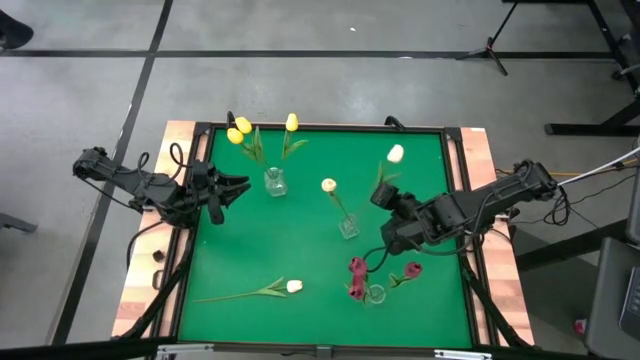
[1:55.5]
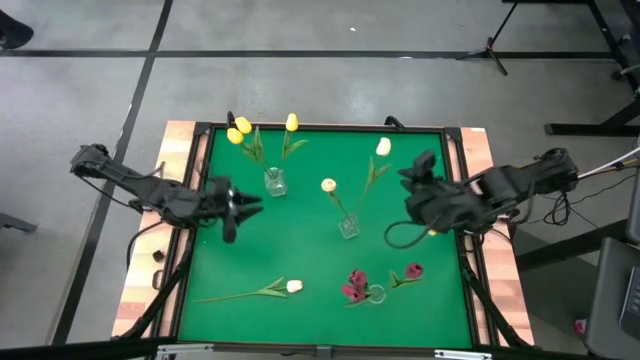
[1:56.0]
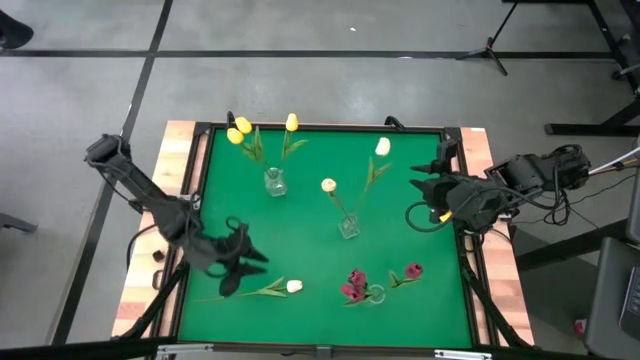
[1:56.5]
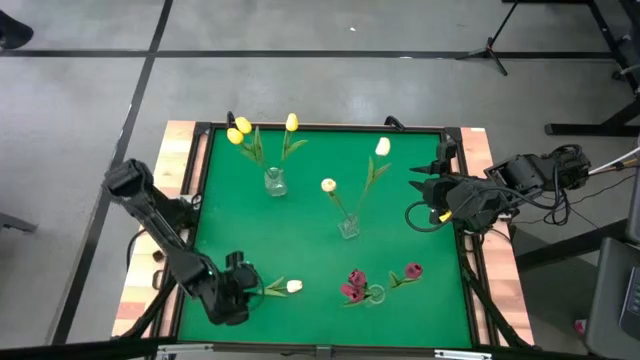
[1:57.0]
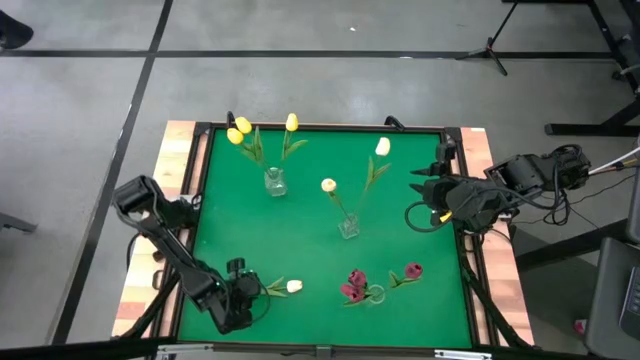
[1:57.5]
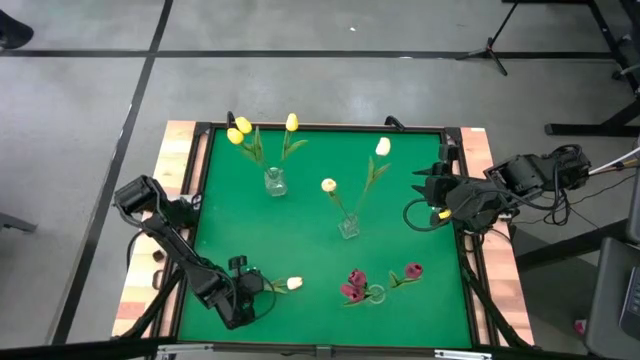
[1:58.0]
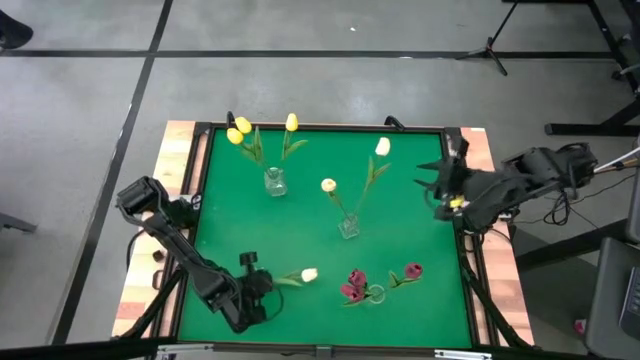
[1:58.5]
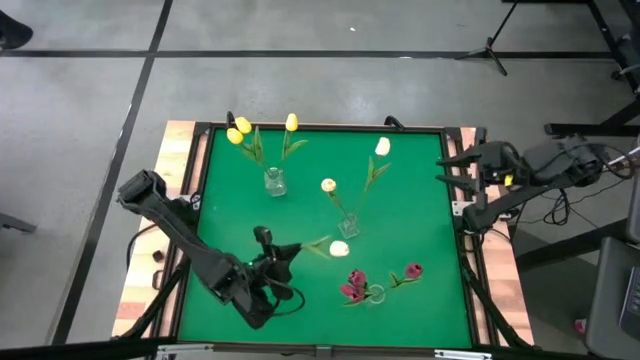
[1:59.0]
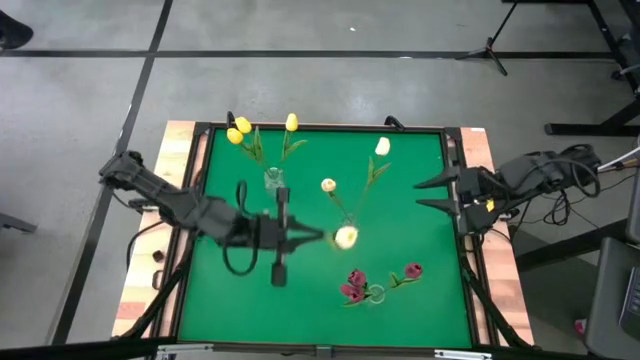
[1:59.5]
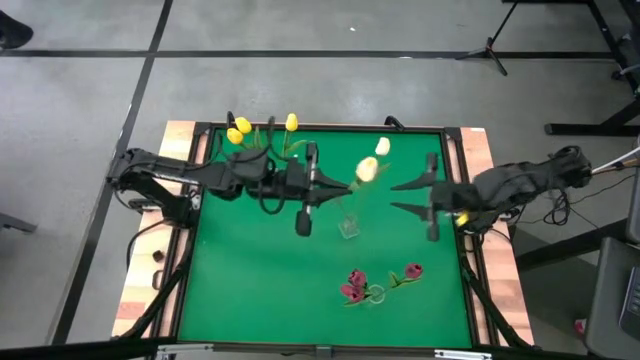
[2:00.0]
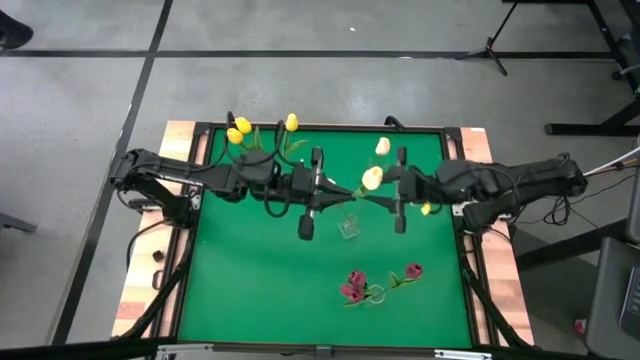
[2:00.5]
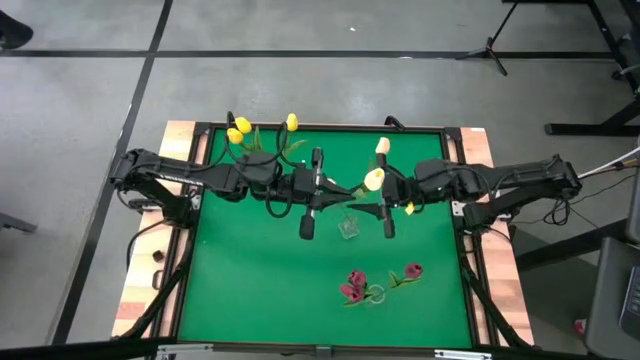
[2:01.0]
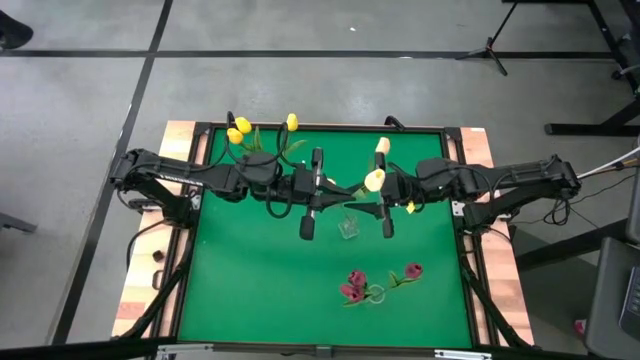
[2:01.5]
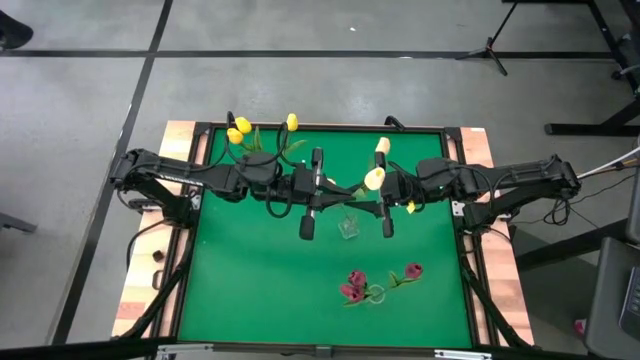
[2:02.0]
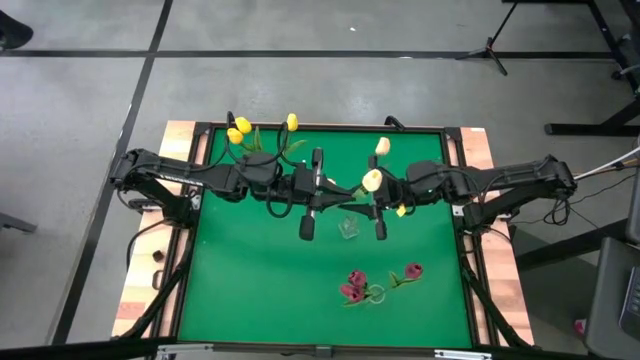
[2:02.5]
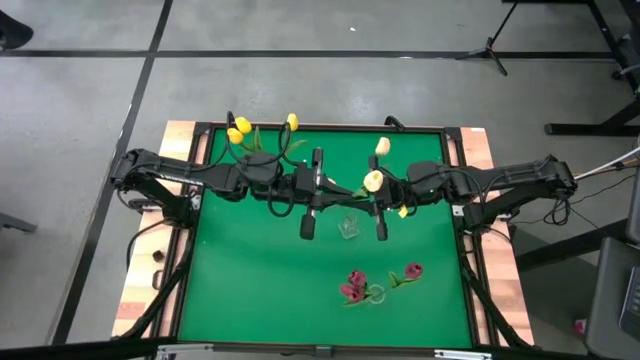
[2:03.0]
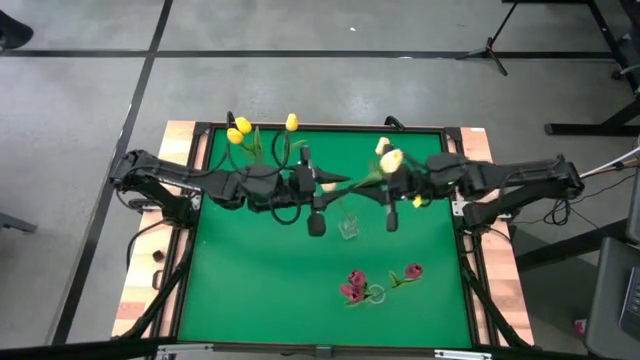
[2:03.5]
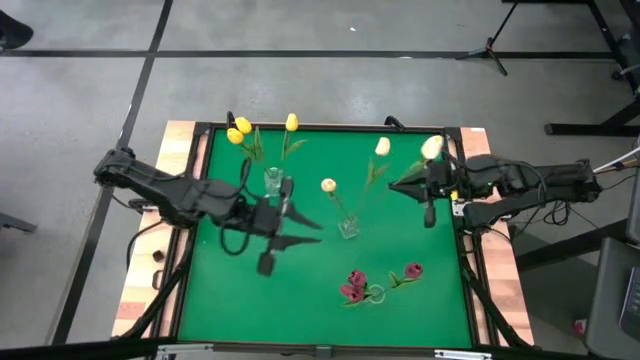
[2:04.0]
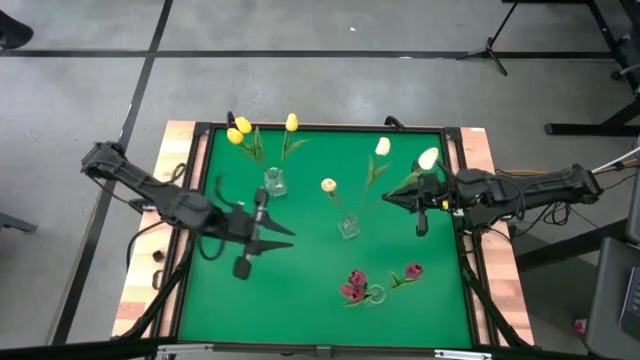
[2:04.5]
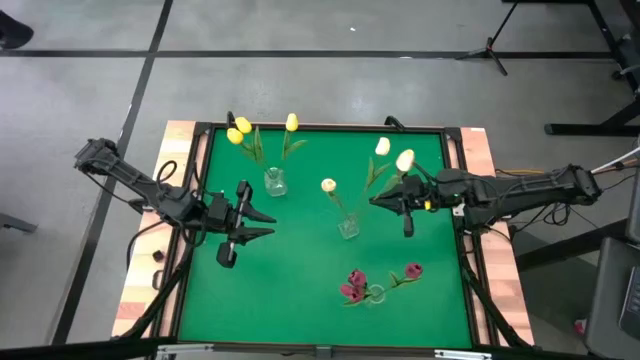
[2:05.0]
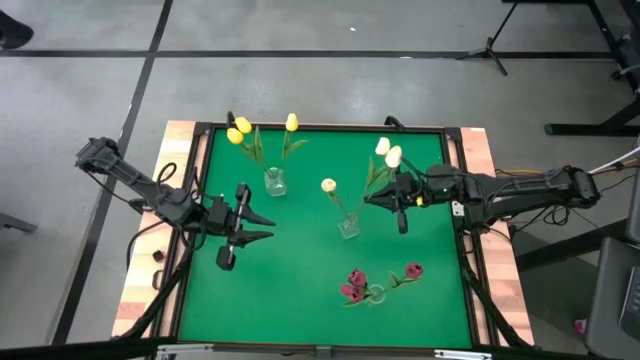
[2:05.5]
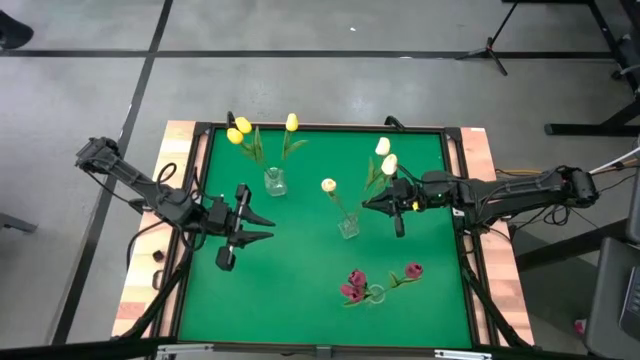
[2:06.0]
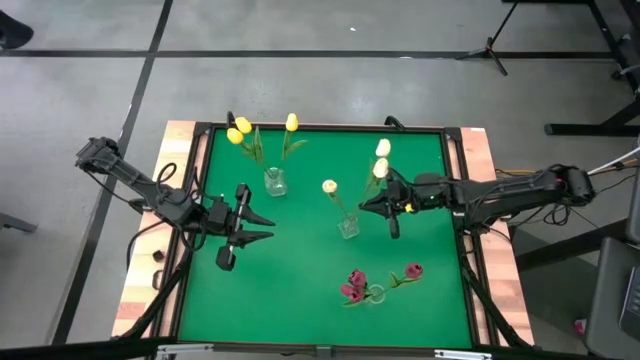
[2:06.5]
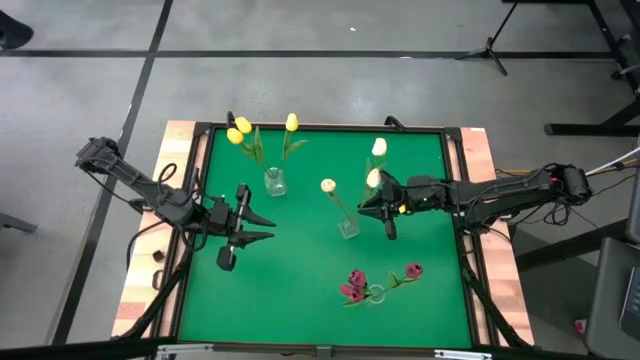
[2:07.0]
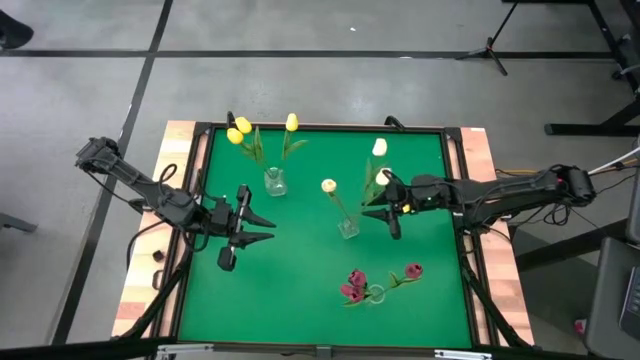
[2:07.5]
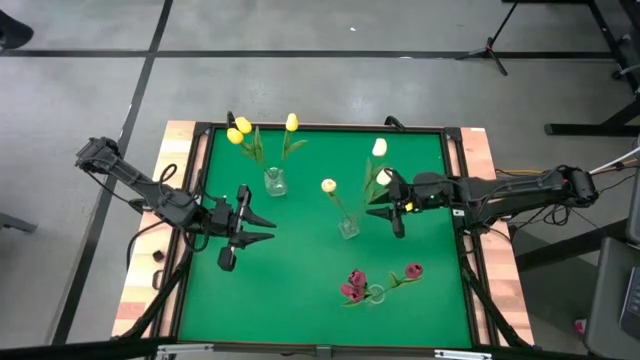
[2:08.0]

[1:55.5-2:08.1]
Task: Sort flowers into vase by color
Put the white tulip into the center transparent vase

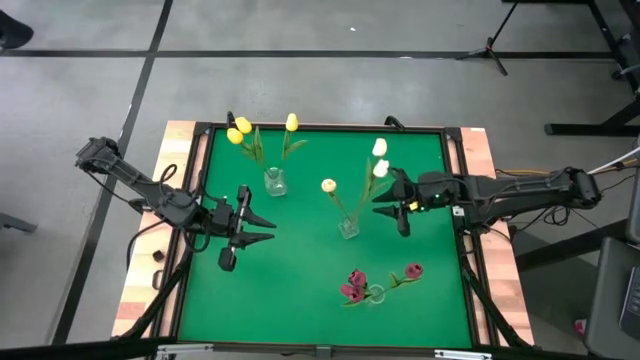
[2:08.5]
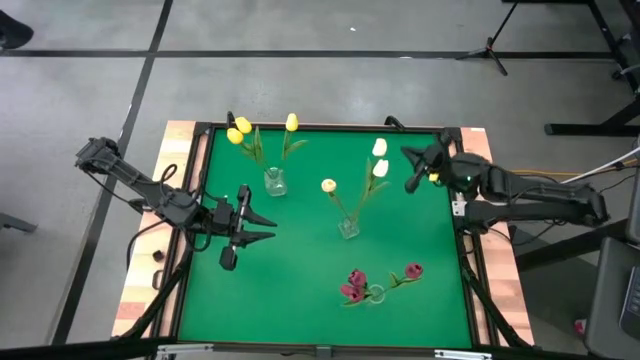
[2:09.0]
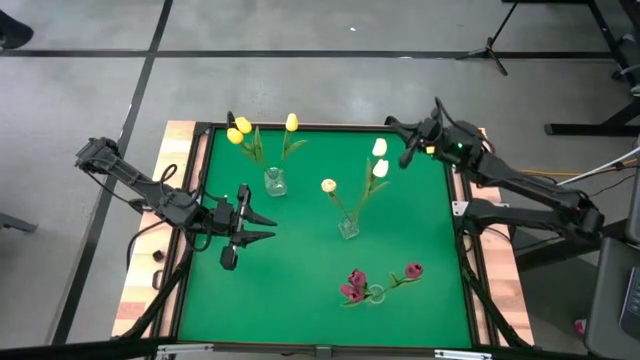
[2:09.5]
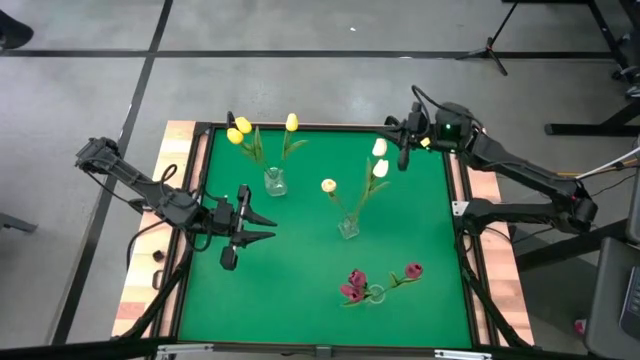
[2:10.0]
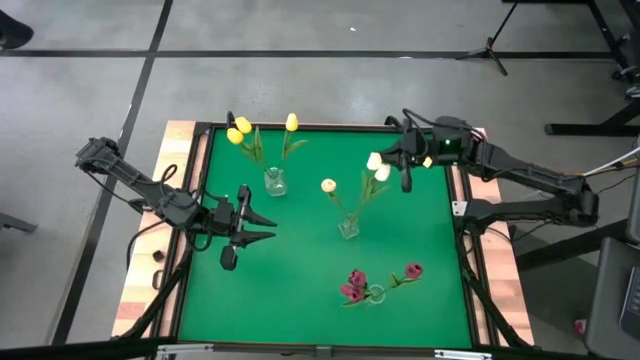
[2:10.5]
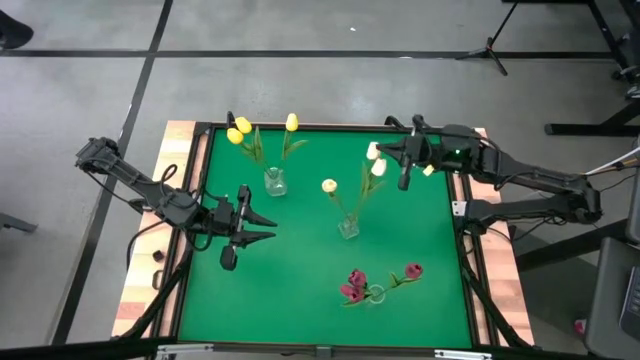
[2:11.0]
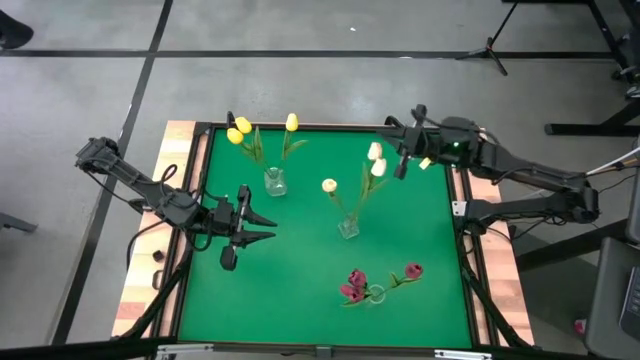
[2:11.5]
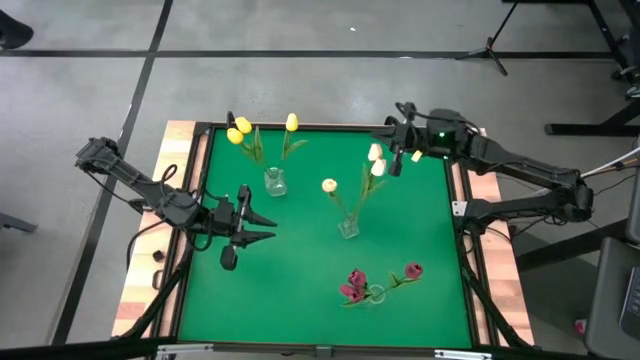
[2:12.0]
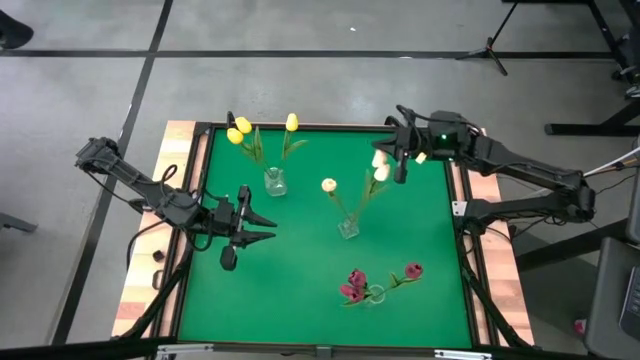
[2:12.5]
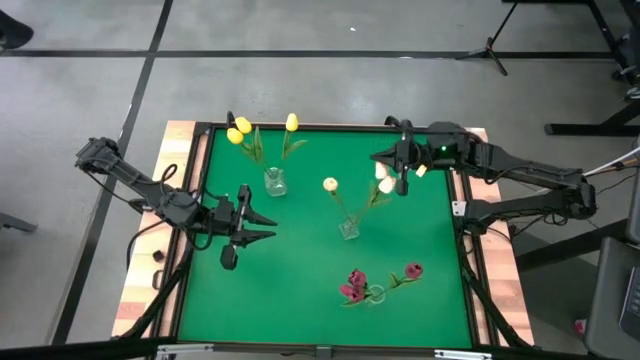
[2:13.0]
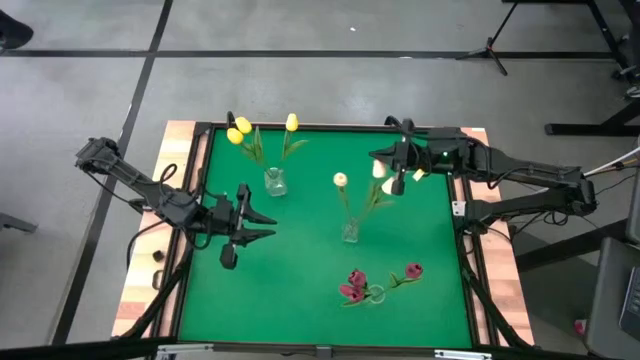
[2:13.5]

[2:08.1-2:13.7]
Adjust the tulip in the center transparent vase

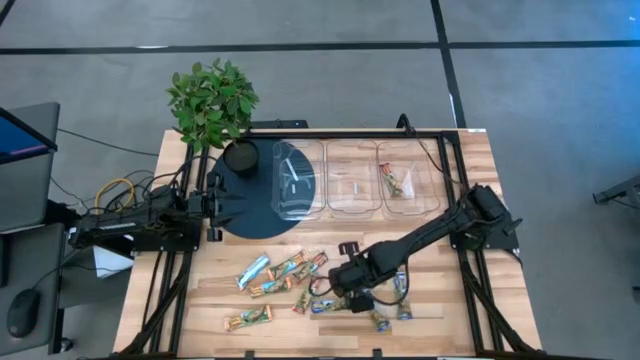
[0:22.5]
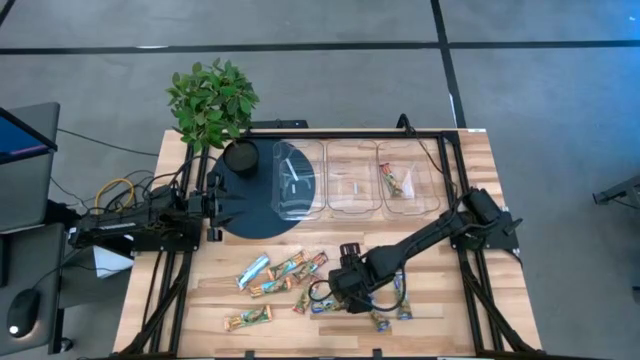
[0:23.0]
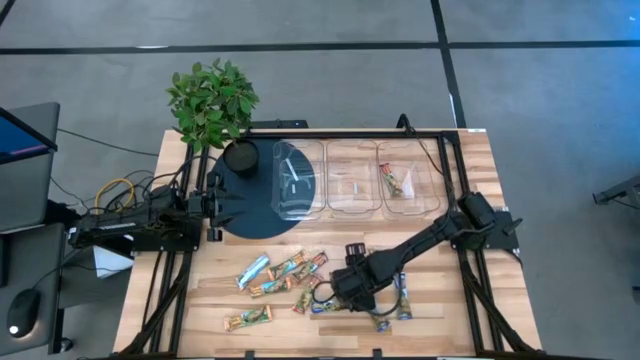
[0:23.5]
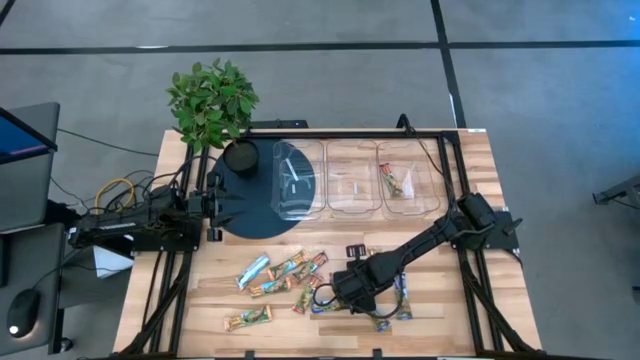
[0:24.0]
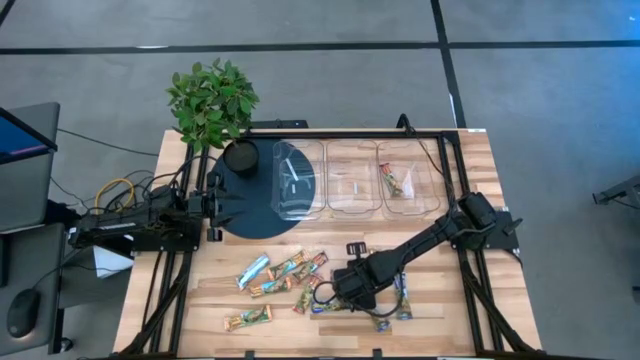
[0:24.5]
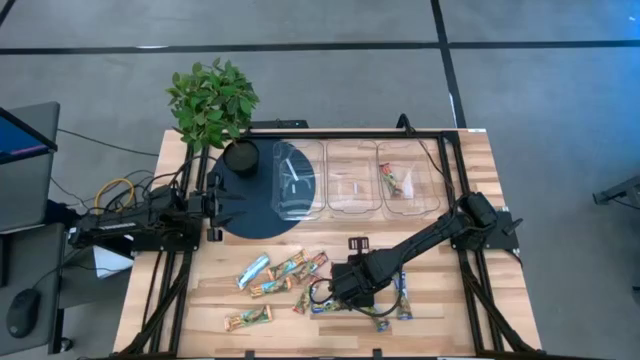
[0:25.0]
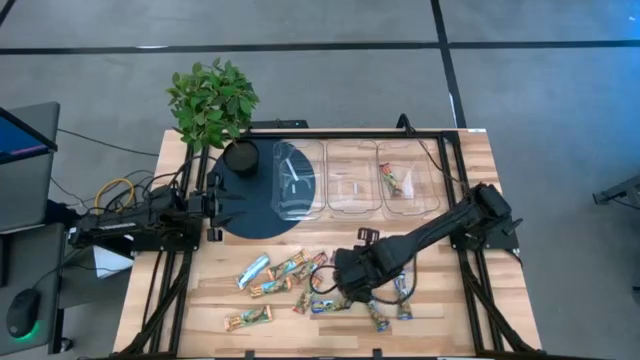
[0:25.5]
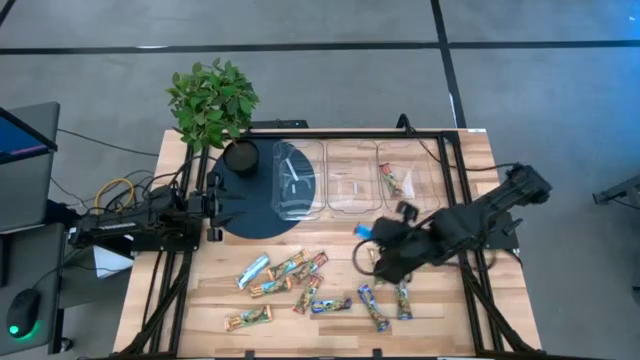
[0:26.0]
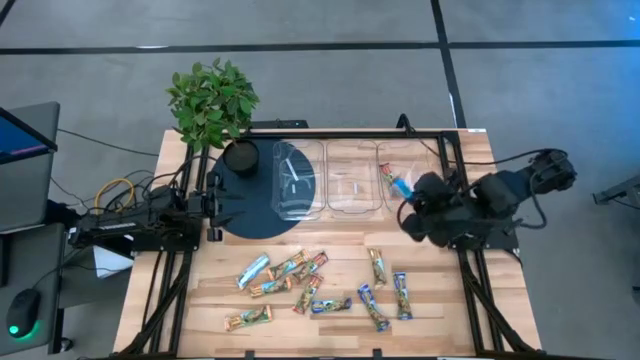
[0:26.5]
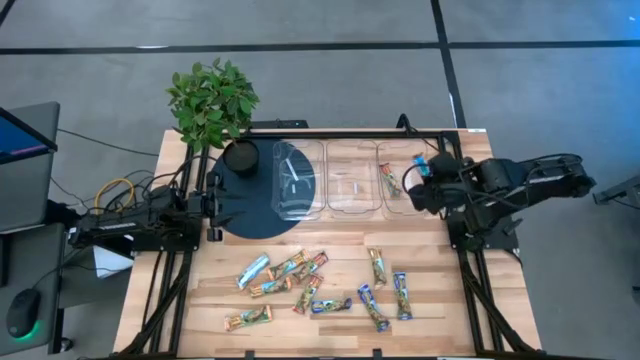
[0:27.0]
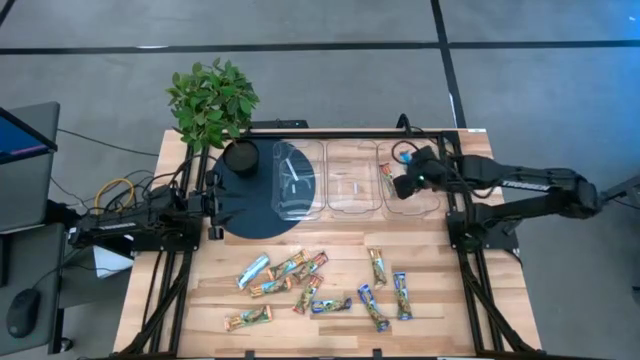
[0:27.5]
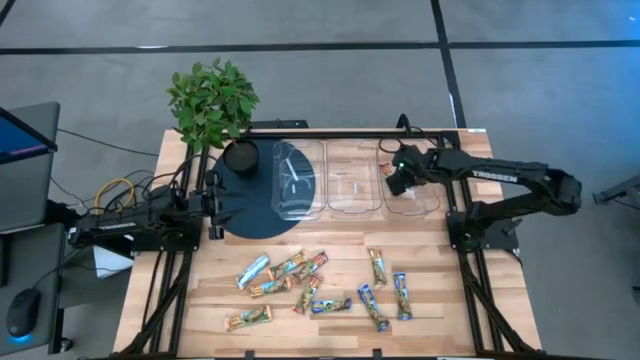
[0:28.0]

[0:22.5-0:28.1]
Task: Pick and place Granola Bars by type
Put the red granola bar into the right transparent bin
